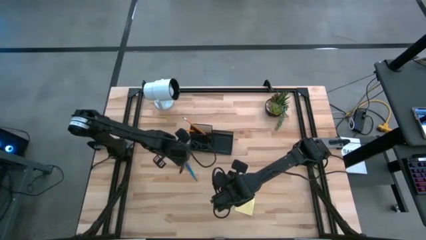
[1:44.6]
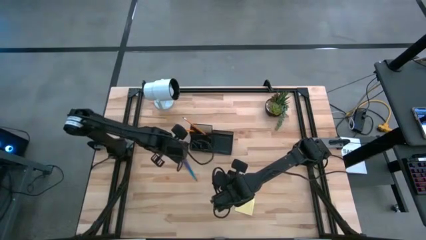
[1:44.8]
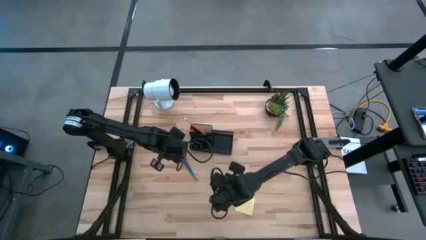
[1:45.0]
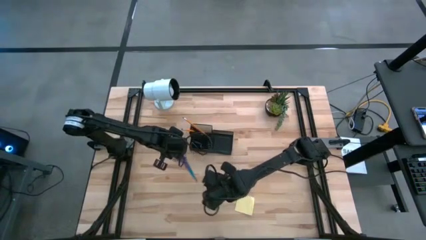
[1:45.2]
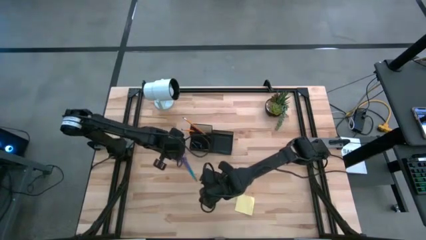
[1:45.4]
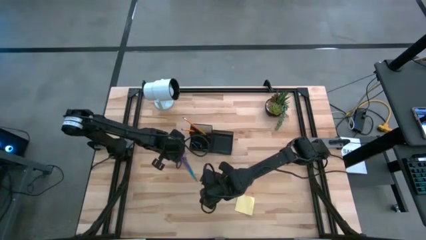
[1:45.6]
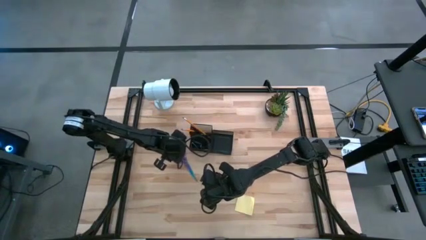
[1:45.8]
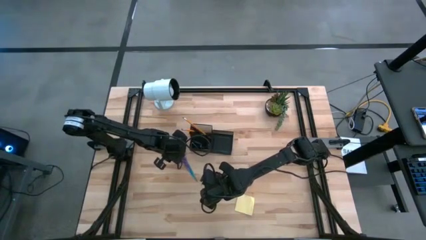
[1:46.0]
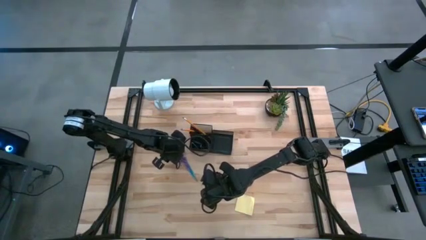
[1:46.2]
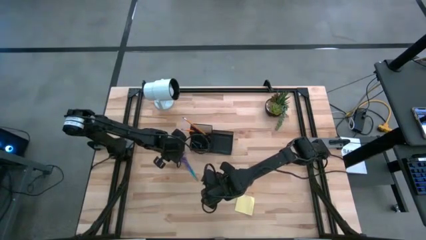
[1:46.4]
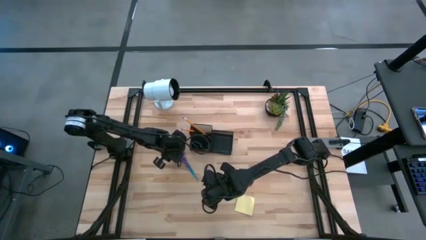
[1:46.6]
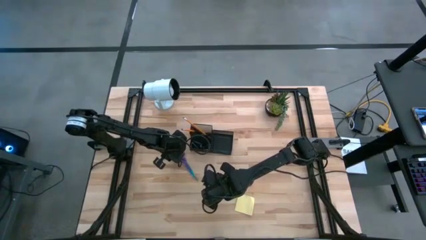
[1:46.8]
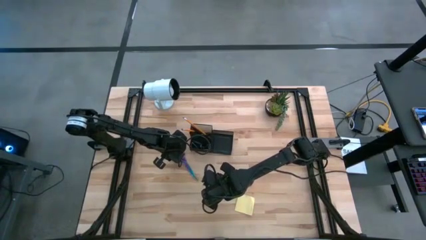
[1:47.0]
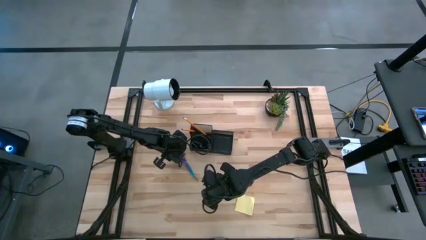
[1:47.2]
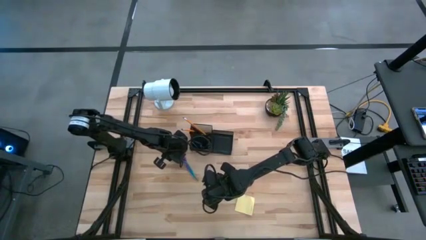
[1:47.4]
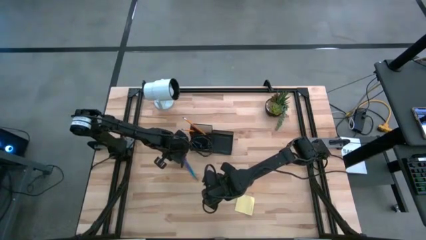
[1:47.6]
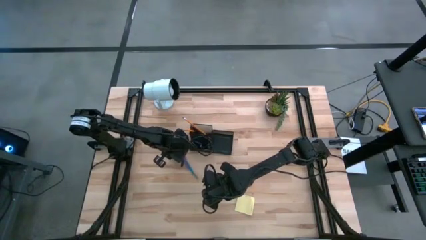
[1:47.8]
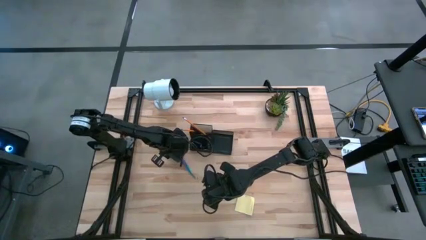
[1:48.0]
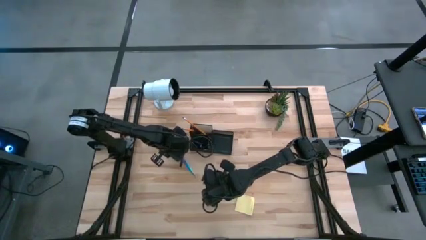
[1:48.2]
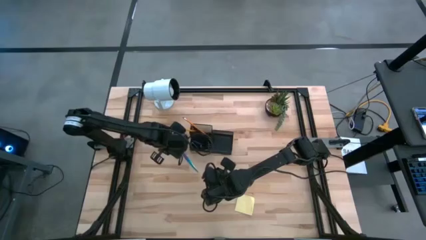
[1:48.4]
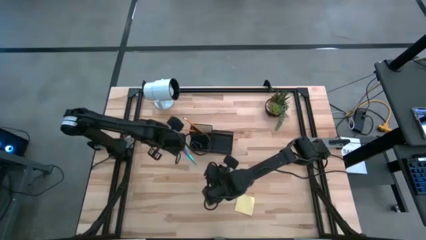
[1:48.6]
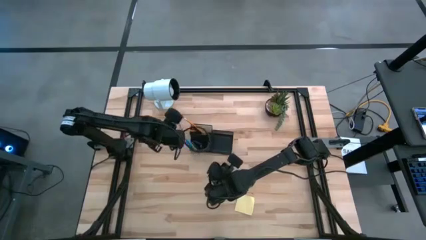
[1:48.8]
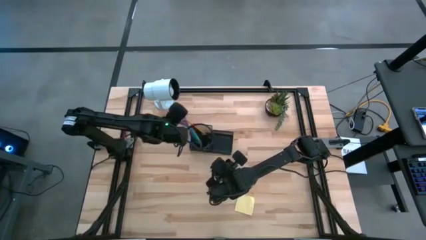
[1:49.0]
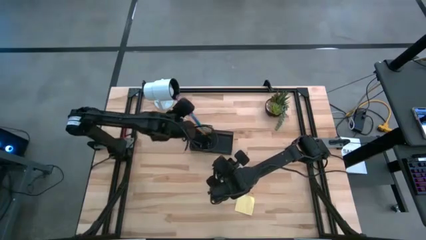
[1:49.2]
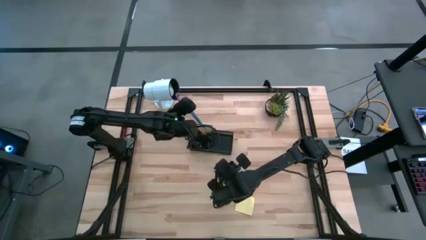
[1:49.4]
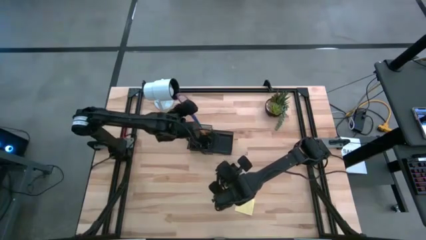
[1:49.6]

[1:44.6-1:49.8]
Task: Pick and place office supplies into organizer
Put the violet scissors into the black desk organizer

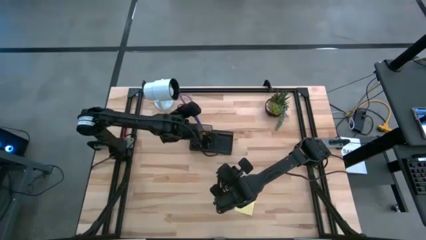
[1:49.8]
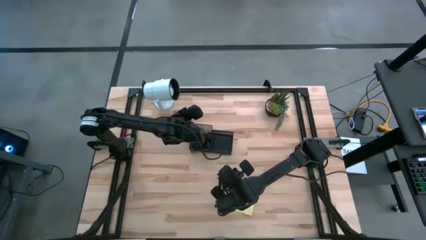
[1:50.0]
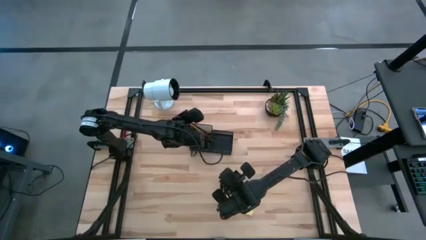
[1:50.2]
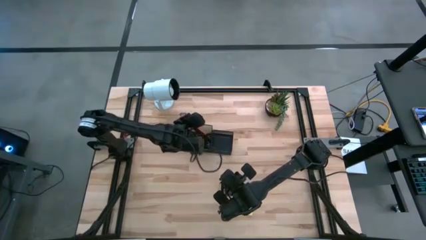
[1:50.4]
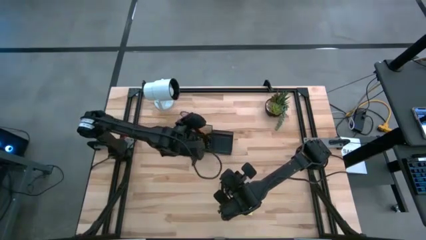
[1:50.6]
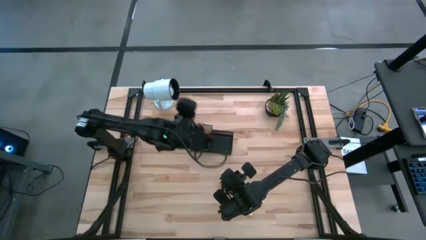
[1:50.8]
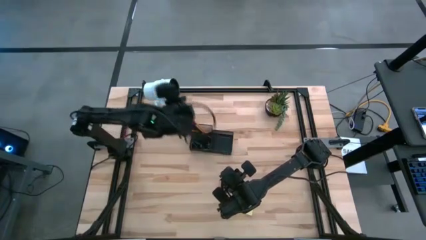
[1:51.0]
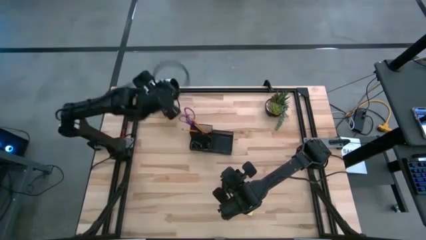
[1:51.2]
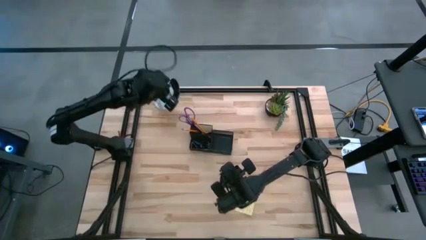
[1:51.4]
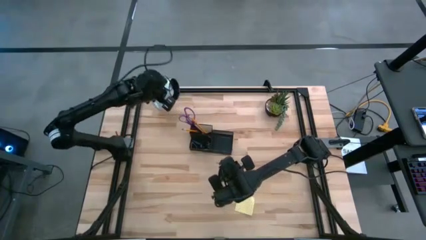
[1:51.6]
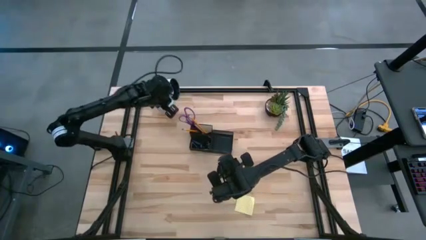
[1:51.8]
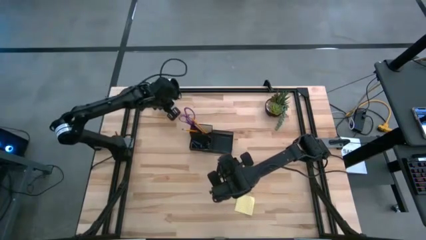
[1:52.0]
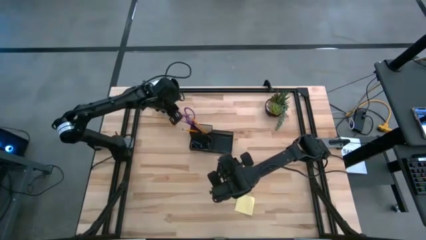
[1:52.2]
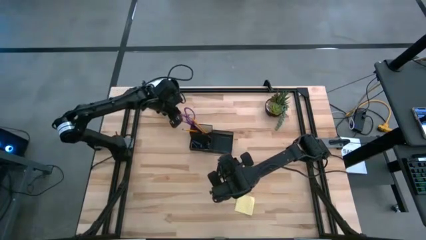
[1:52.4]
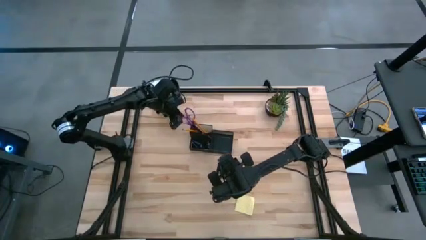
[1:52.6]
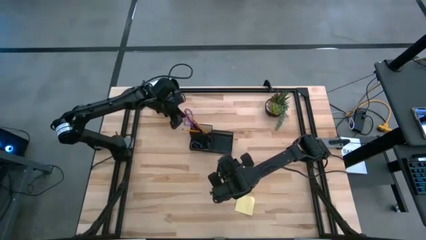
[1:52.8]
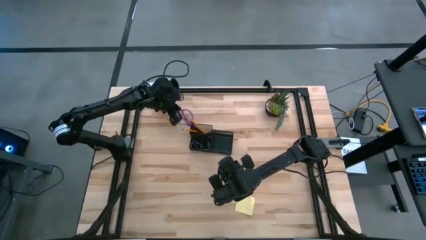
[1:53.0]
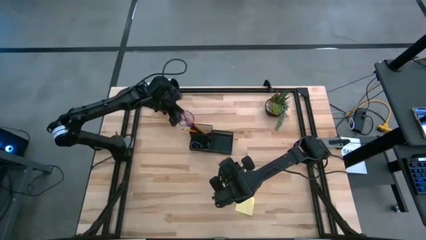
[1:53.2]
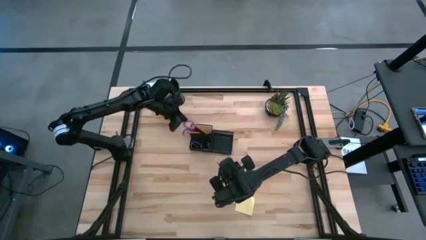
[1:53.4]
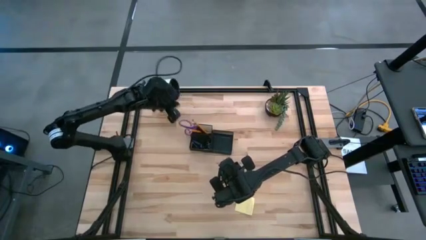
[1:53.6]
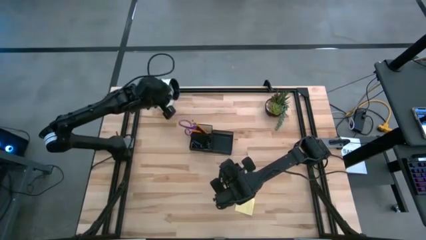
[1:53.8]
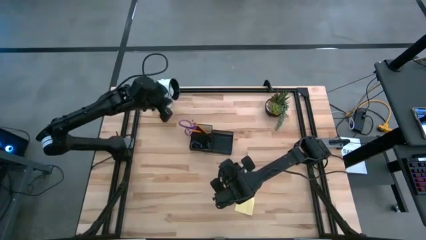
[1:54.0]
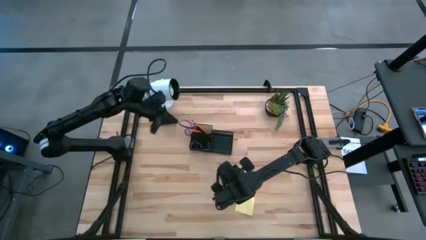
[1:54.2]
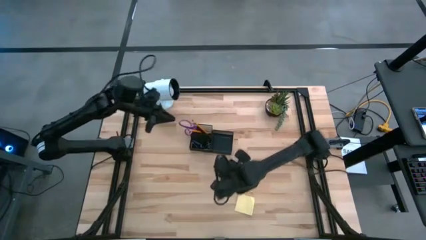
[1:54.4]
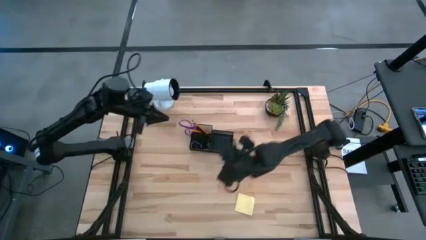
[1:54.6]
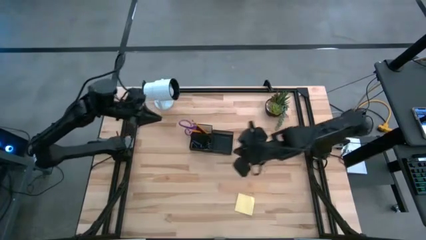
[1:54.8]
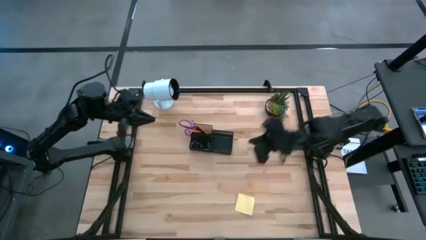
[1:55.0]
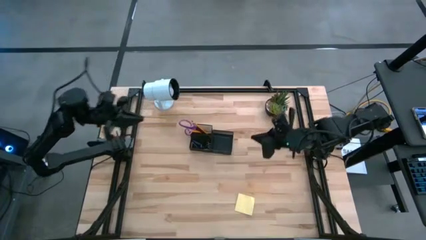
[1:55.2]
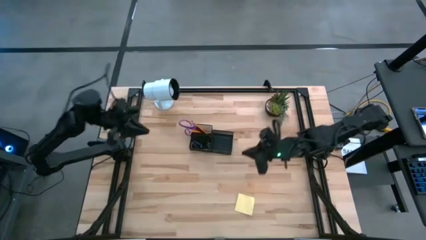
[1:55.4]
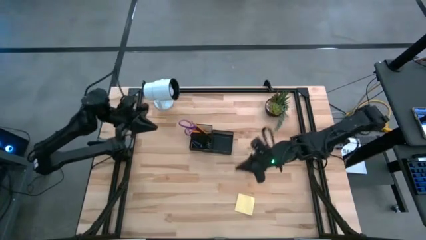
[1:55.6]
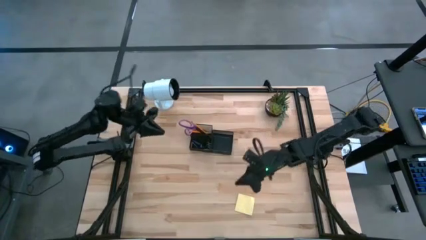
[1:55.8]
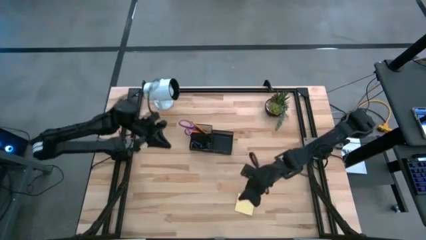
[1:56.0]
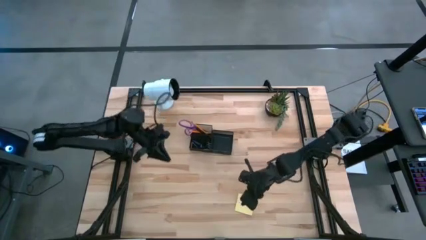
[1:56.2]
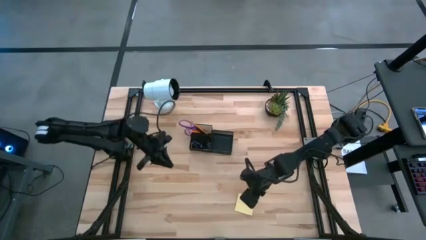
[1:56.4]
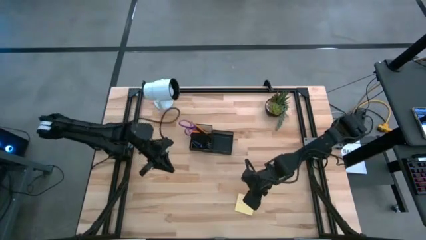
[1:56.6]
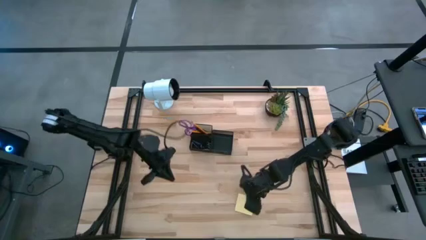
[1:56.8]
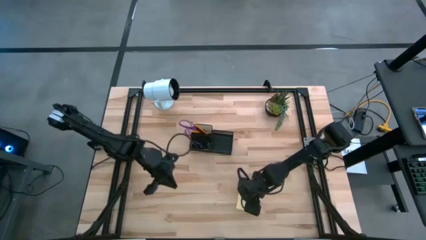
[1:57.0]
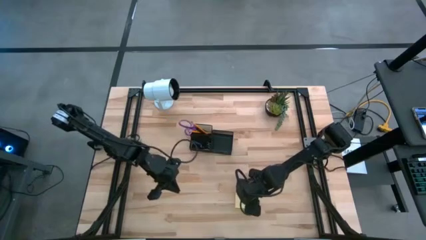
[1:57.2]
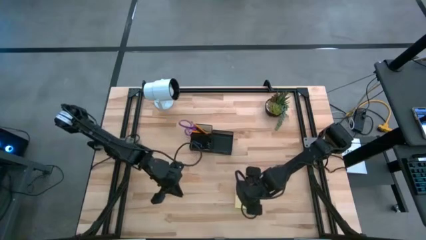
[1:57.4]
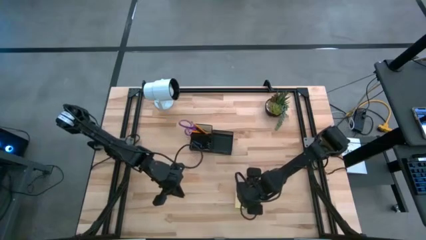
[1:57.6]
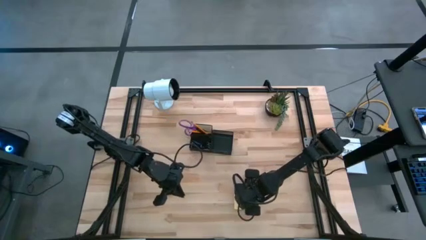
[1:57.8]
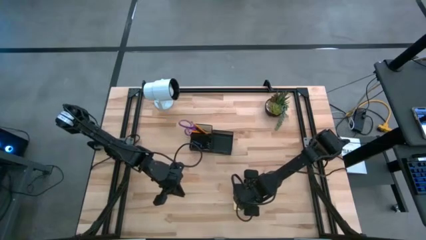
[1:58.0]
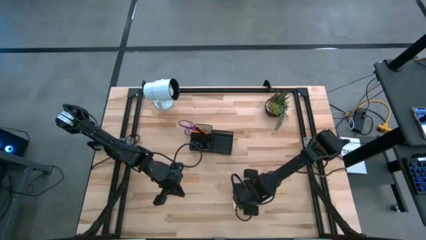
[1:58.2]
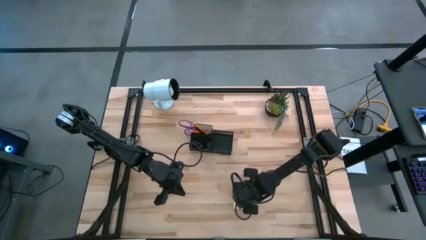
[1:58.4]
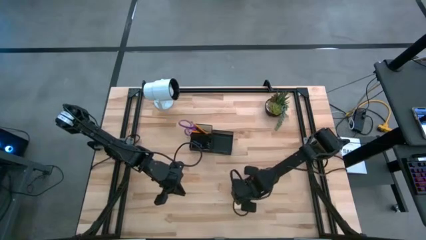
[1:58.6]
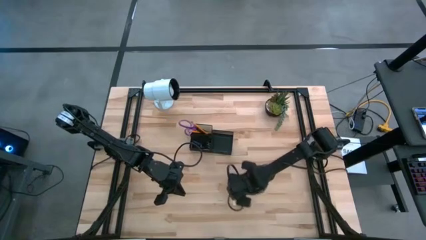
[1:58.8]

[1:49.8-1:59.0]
Put the yellow sticky note into the black desk organizer

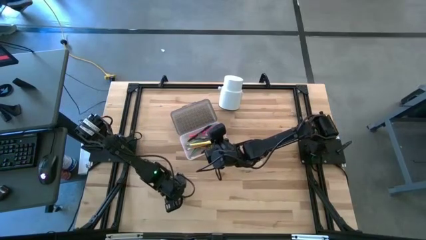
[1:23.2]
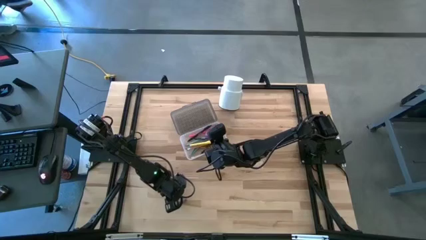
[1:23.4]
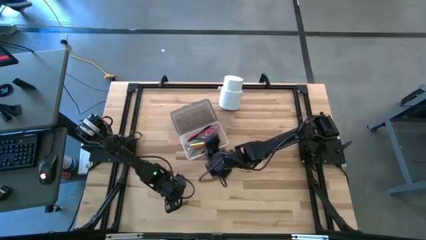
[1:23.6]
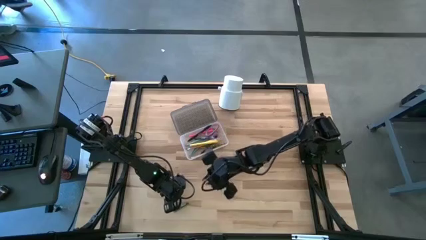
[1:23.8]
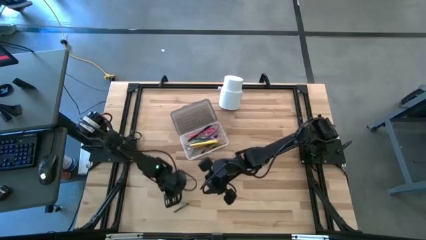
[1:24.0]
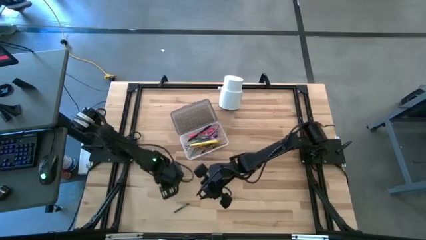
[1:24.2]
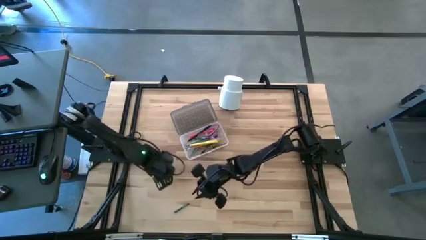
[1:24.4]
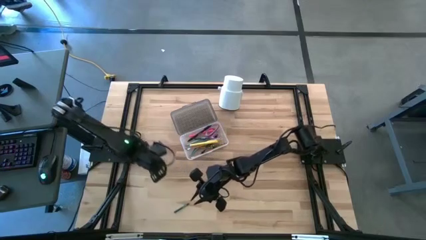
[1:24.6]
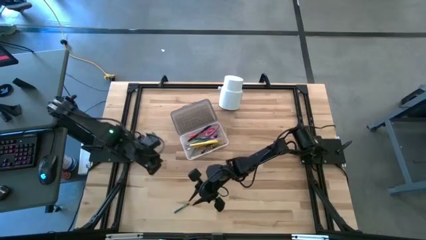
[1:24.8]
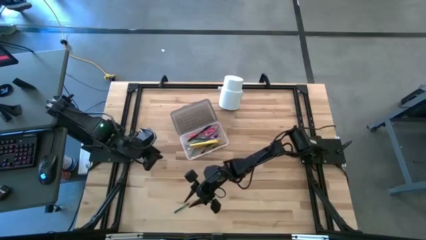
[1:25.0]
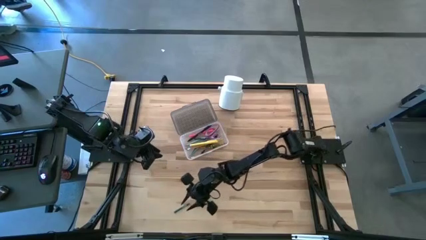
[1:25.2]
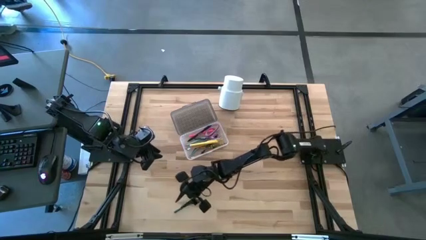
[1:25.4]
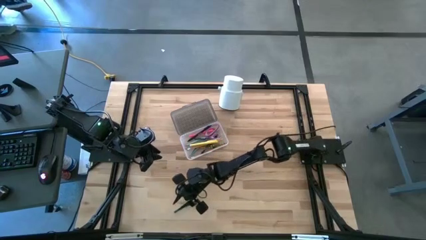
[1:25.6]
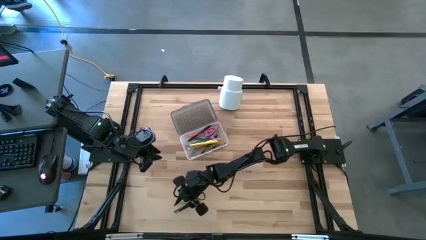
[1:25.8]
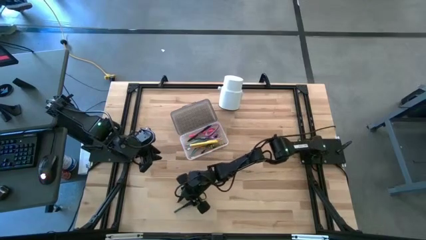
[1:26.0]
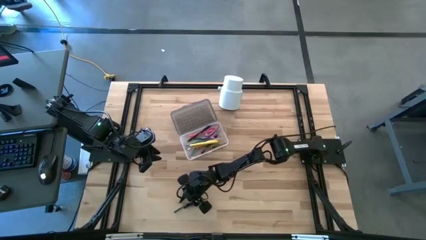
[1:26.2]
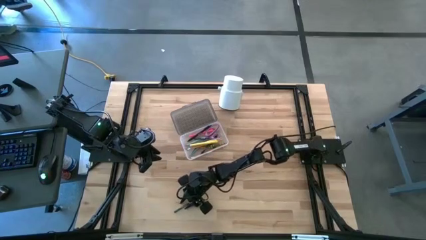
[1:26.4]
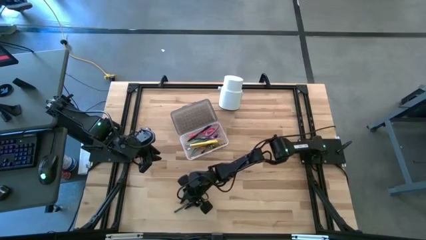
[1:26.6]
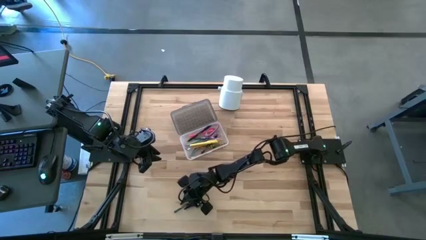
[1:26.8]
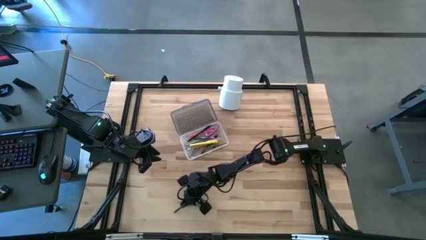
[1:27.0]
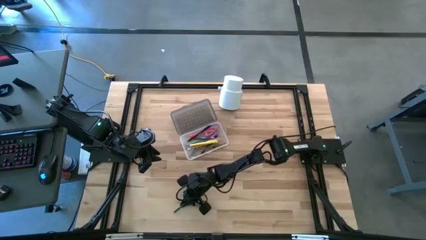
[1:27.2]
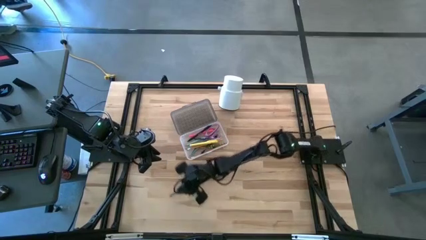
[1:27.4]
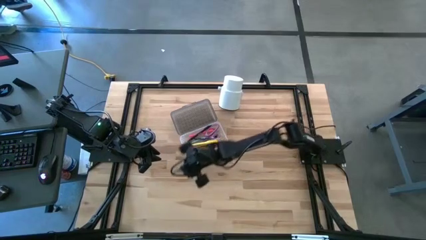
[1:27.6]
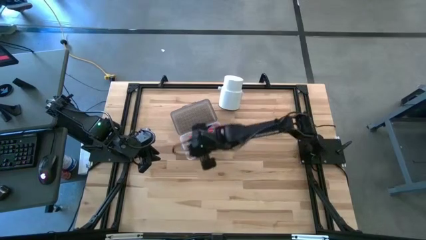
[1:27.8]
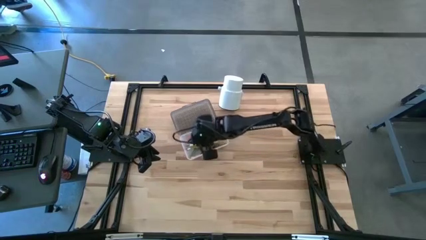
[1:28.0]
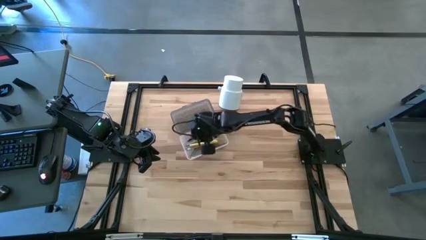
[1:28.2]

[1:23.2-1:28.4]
Task: Pick & place school supplies into a supply box
Put the green crayon into the black supply box
